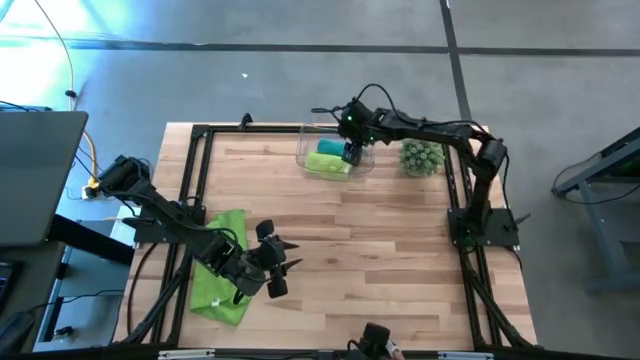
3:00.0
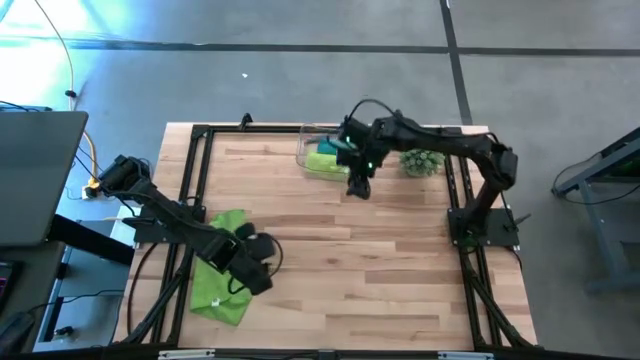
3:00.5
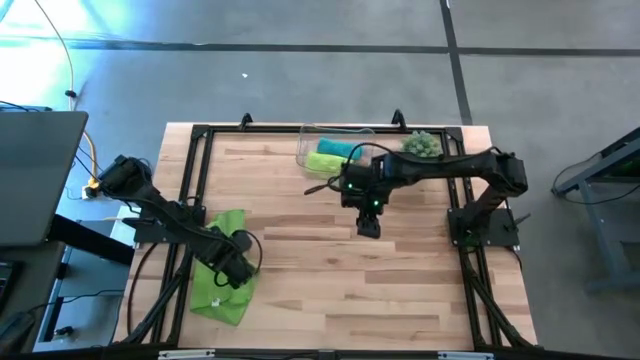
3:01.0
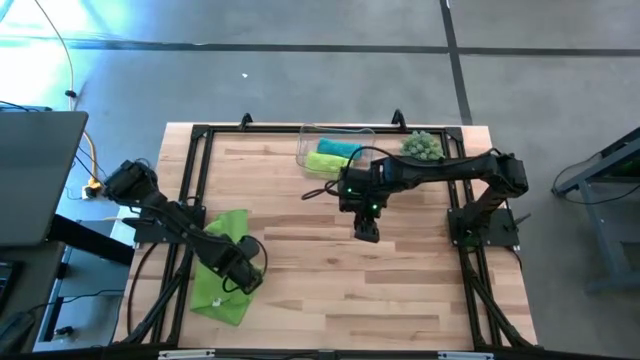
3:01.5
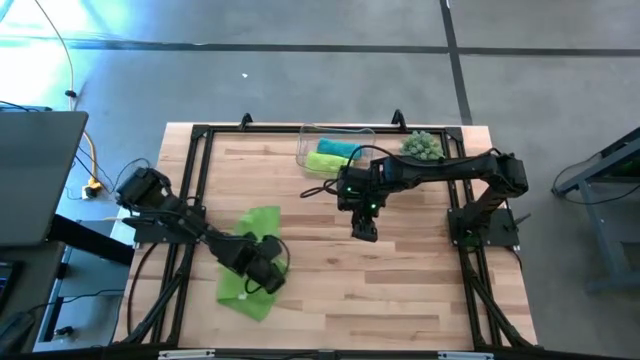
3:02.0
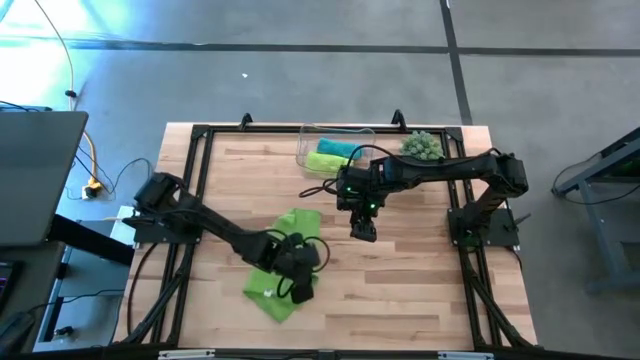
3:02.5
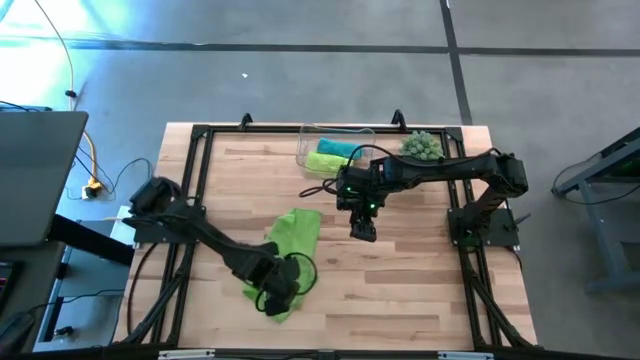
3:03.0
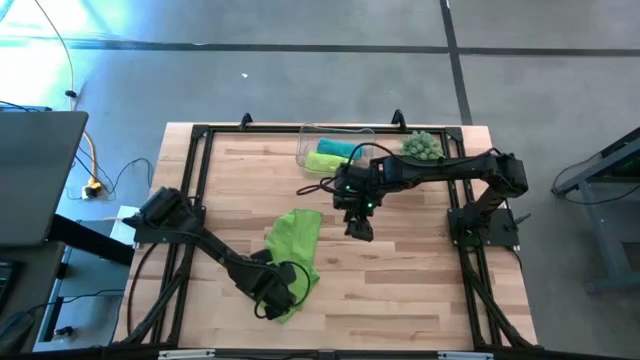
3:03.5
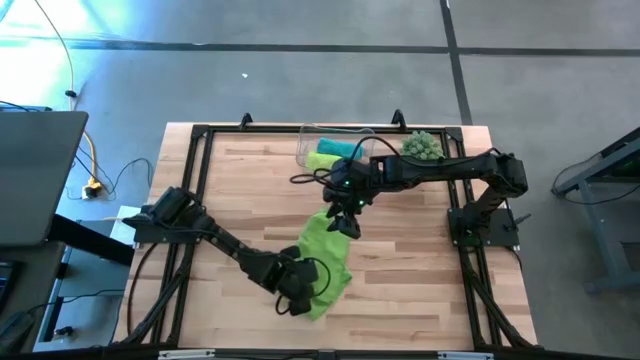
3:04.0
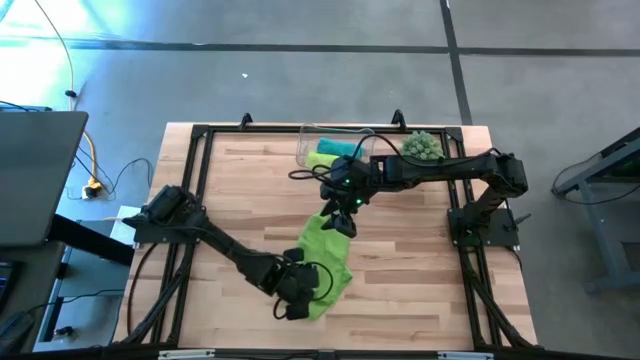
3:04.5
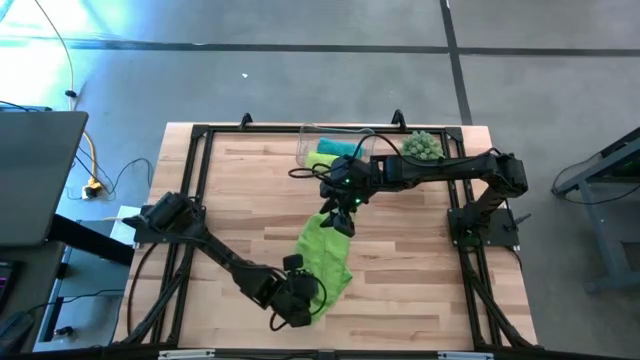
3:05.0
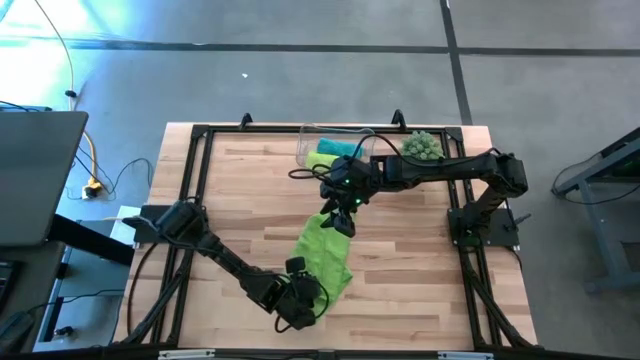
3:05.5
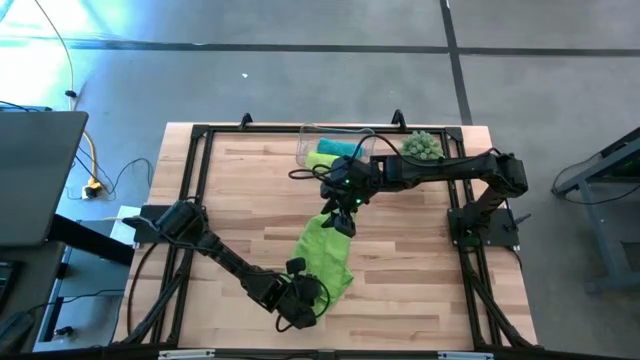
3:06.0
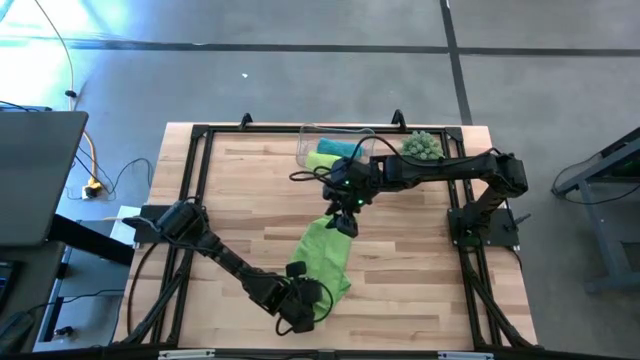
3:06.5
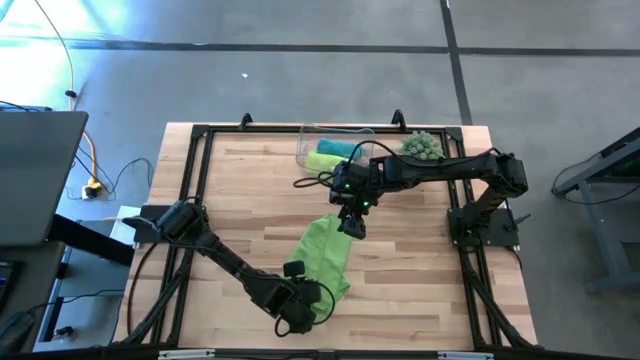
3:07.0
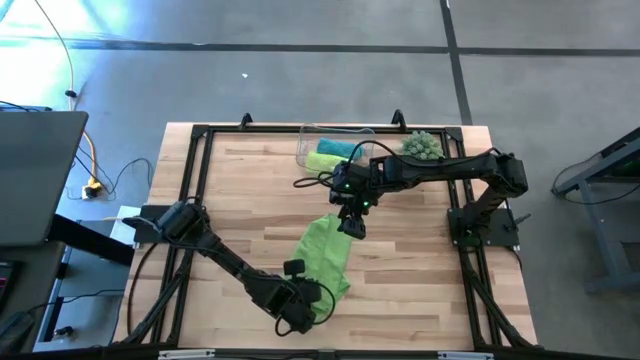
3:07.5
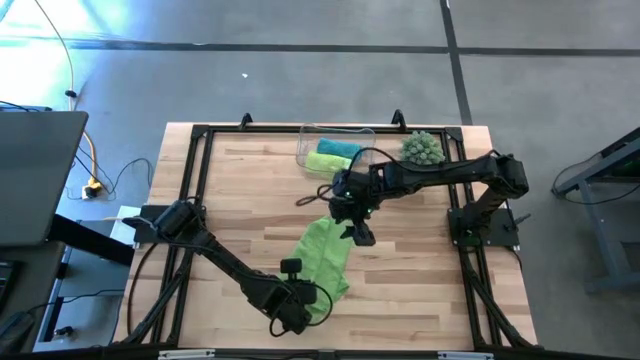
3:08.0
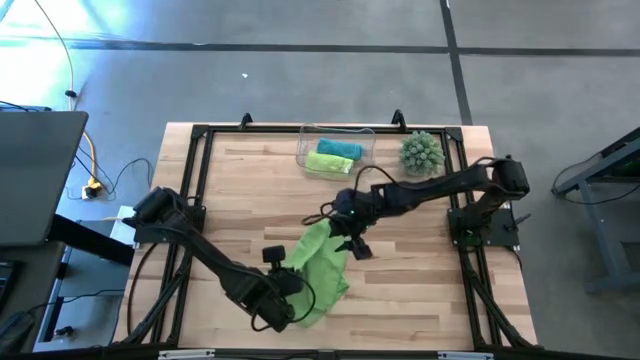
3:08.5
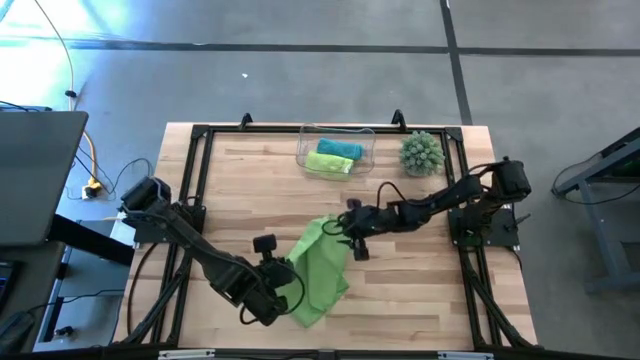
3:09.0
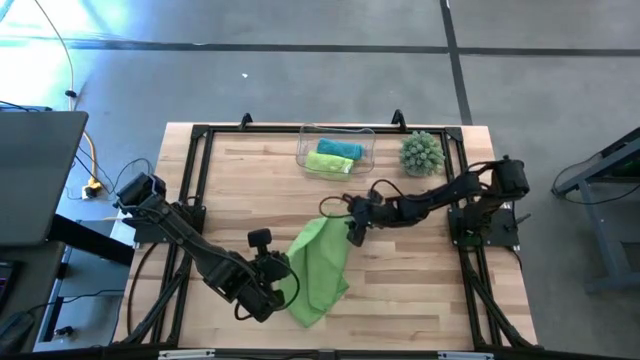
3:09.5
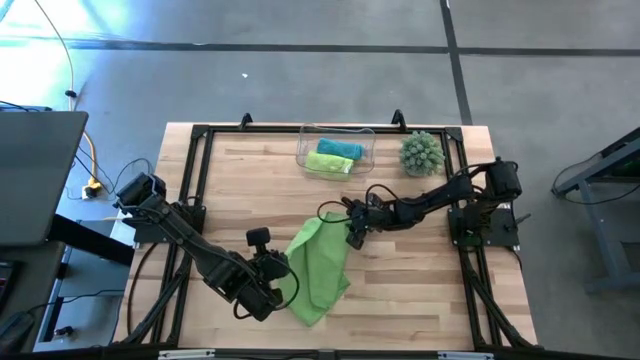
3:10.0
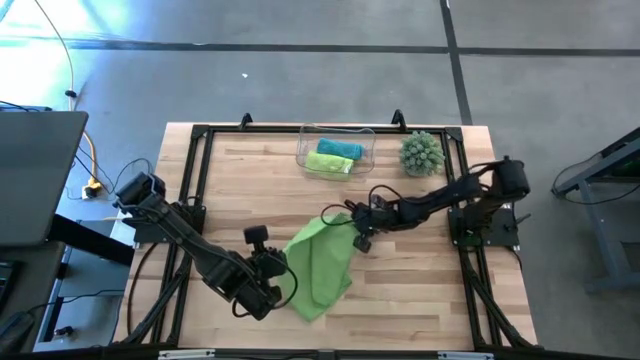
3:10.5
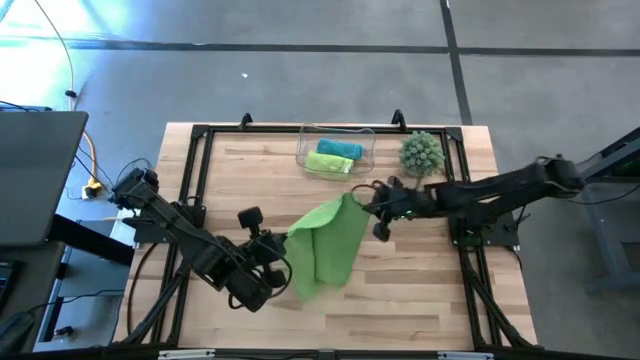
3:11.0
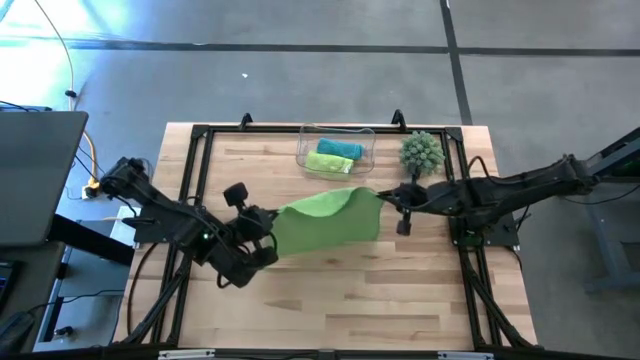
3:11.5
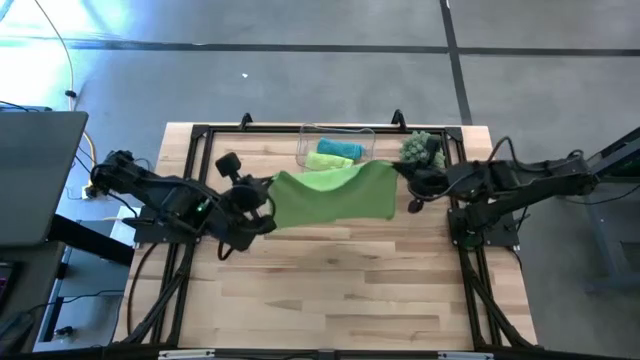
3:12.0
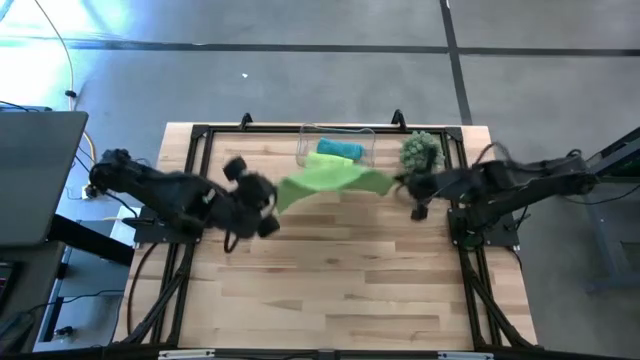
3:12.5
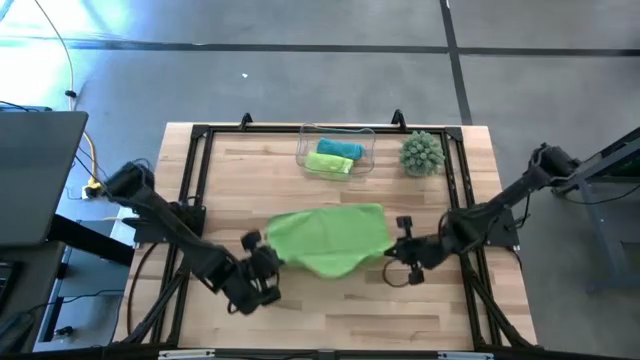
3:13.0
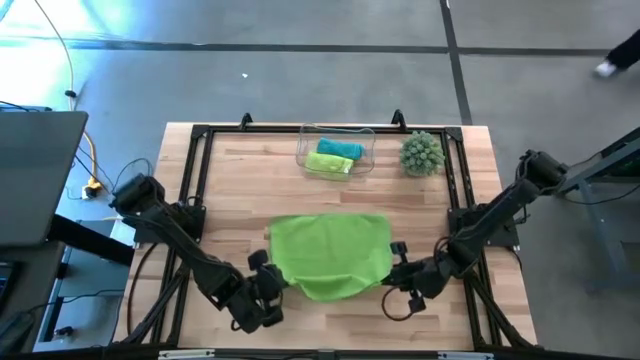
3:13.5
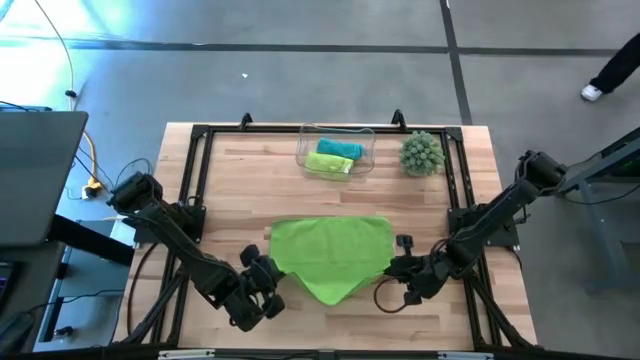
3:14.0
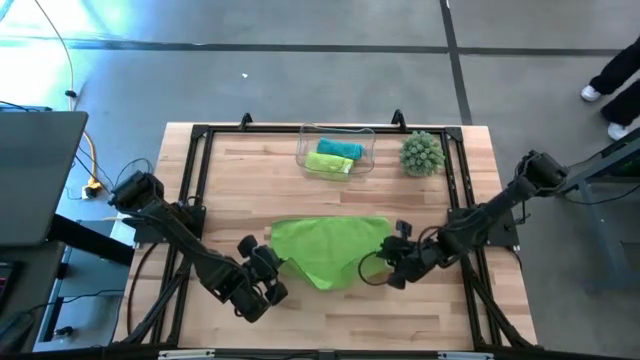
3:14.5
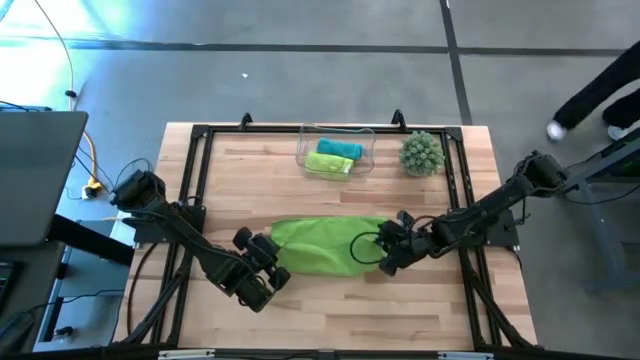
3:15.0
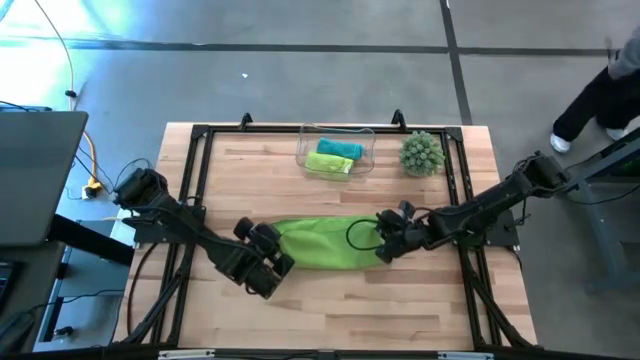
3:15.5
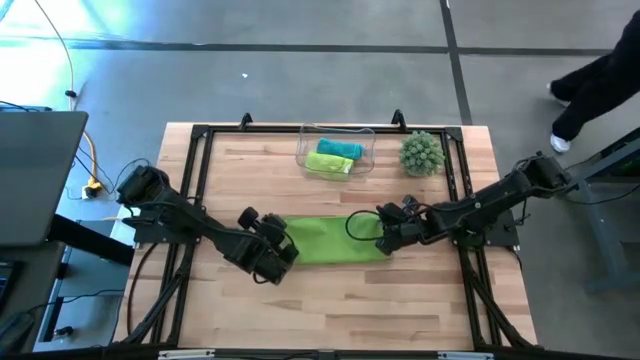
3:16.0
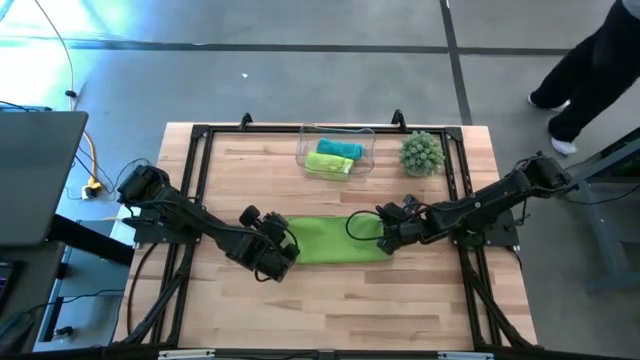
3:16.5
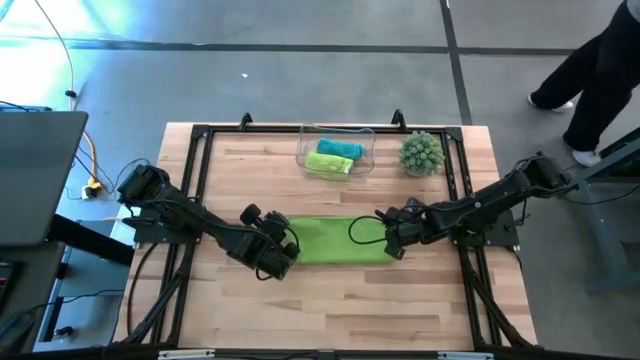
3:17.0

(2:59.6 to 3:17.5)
Task: Roll microfiber towels into tight, uniform cylinder then place into a basket
Fold the green microfiber cloth

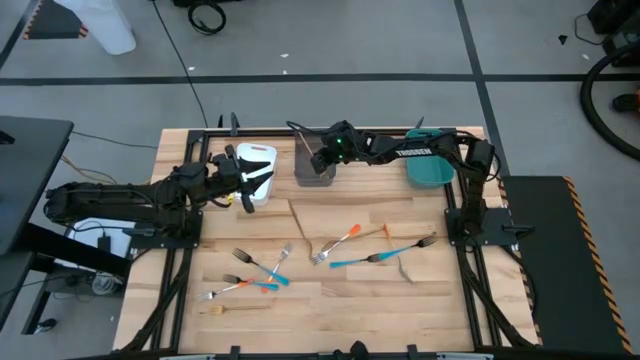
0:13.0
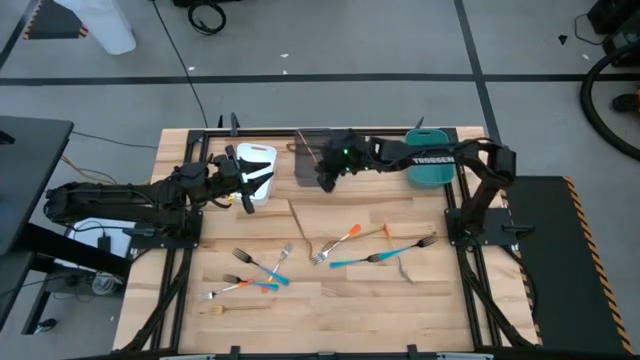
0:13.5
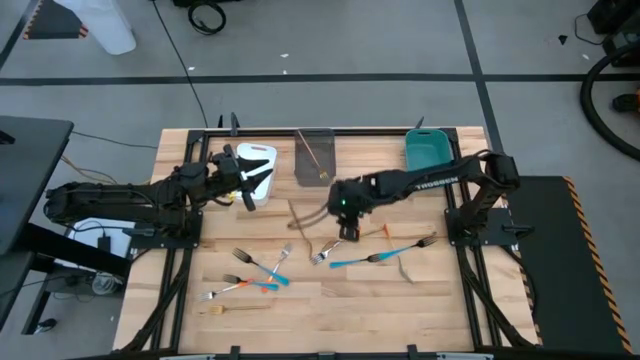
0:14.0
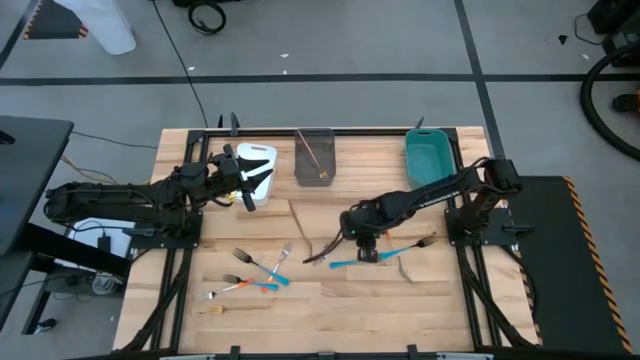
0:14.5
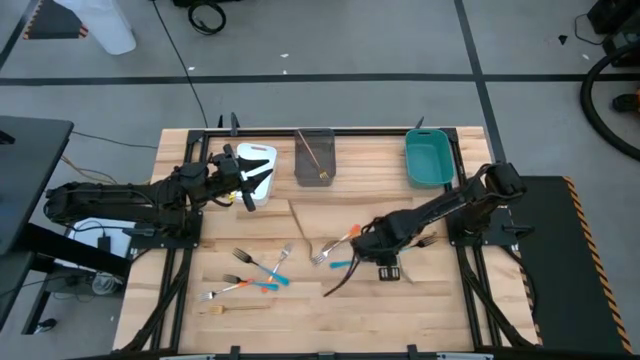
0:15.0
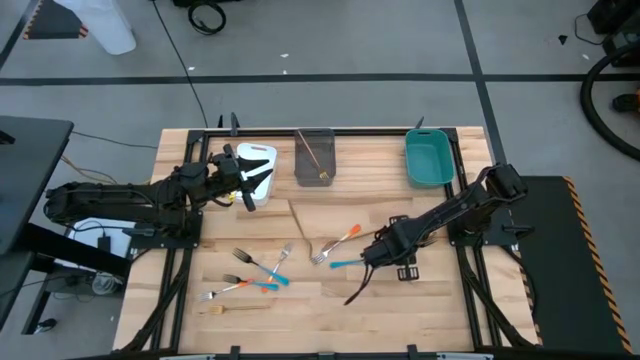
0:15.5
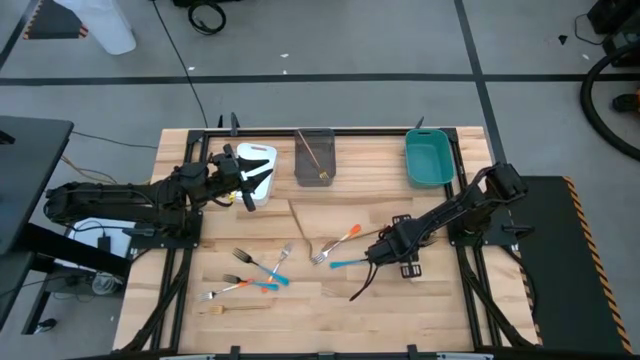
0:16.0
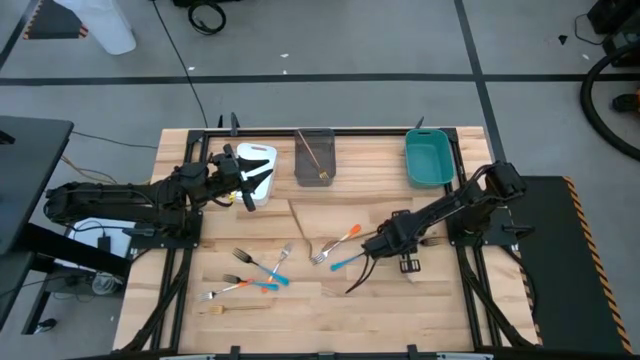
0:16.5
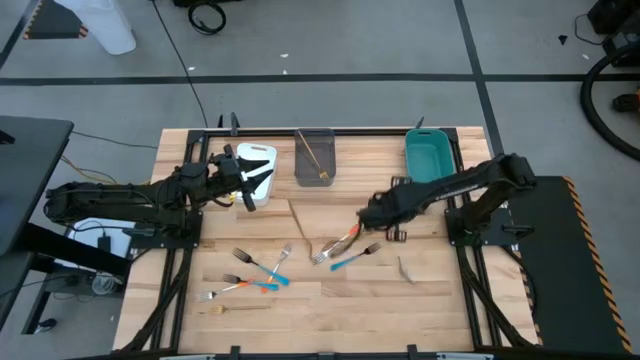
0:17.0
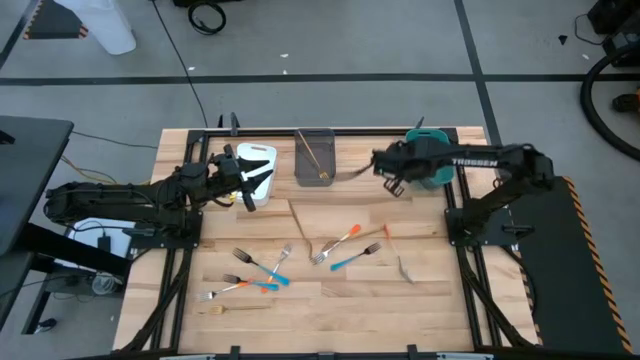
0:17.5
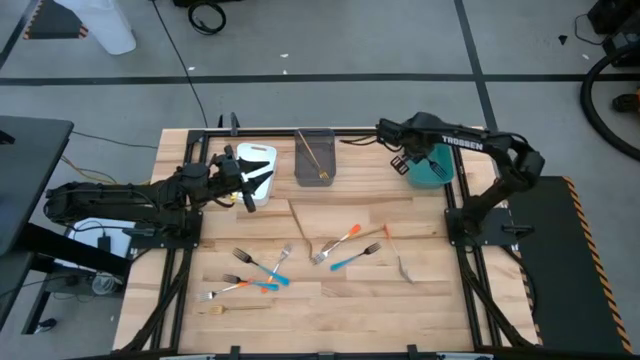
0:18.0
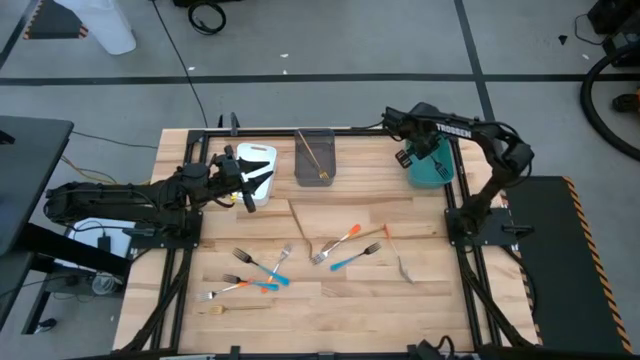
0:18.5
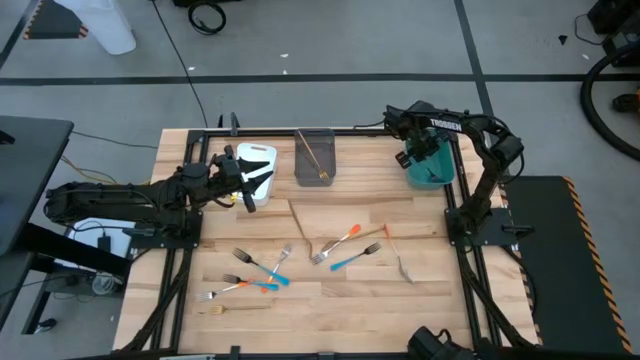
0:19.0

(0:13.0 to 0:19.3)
Task: Sort silverware by color (type)
Put the blue fork into the green bin
